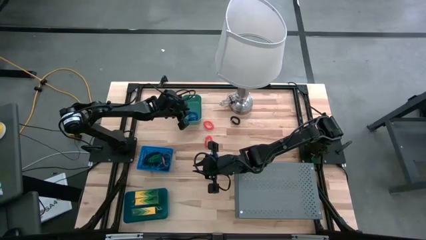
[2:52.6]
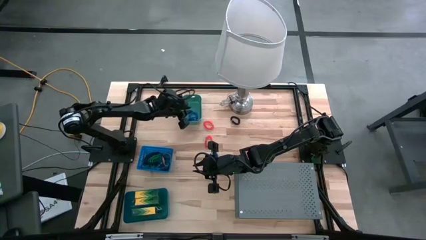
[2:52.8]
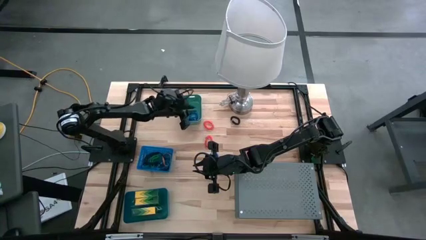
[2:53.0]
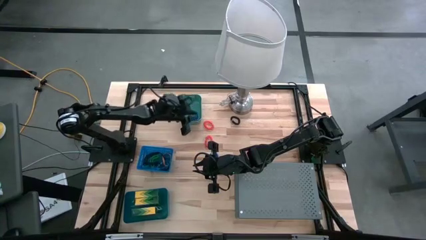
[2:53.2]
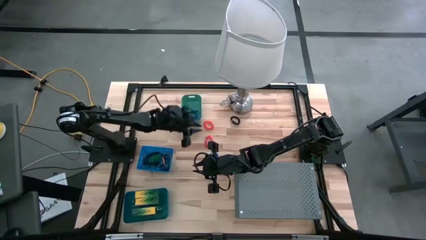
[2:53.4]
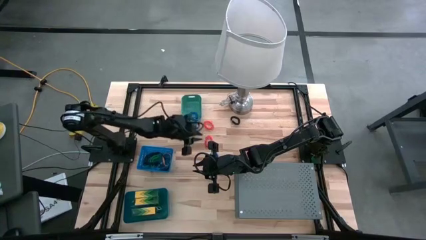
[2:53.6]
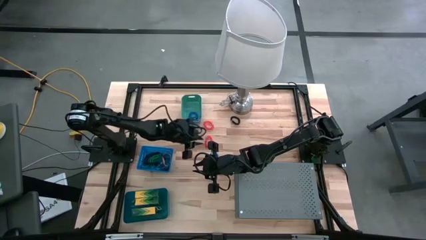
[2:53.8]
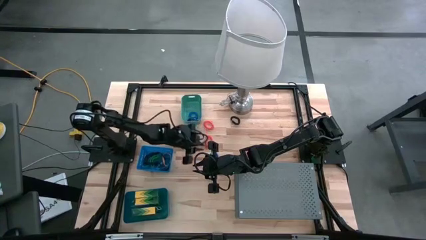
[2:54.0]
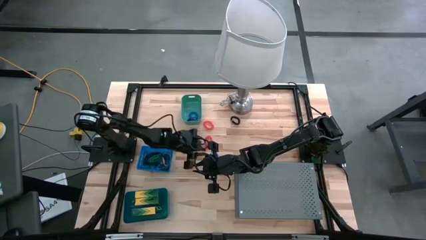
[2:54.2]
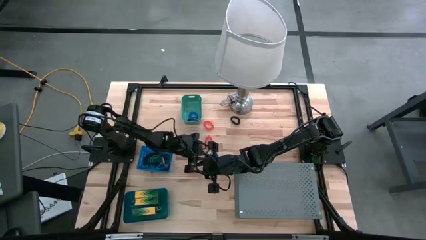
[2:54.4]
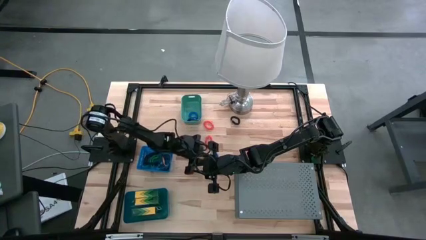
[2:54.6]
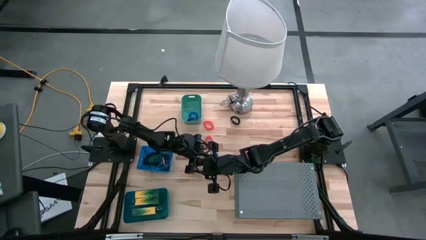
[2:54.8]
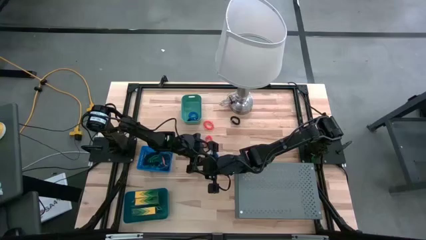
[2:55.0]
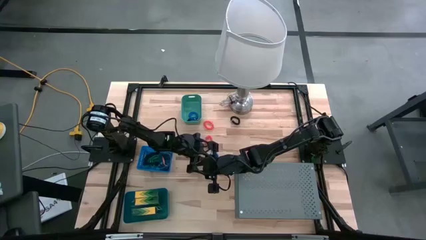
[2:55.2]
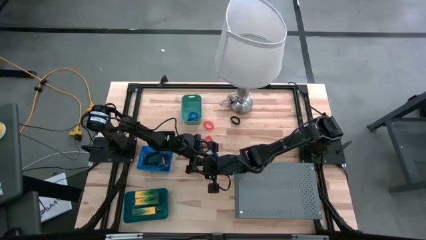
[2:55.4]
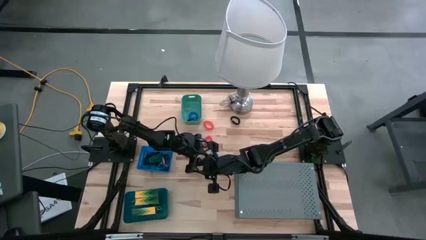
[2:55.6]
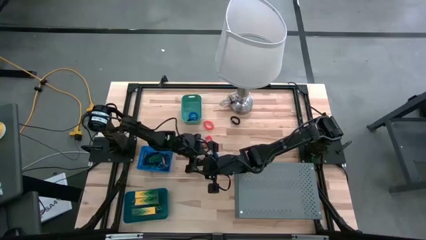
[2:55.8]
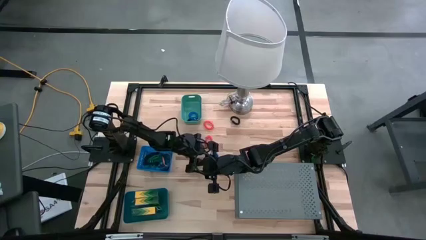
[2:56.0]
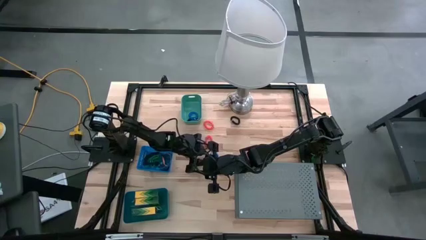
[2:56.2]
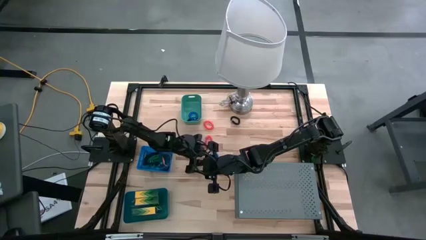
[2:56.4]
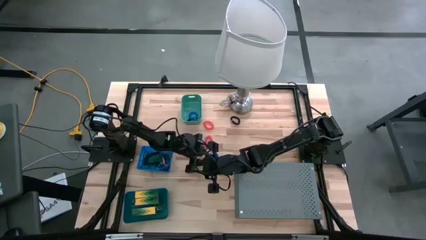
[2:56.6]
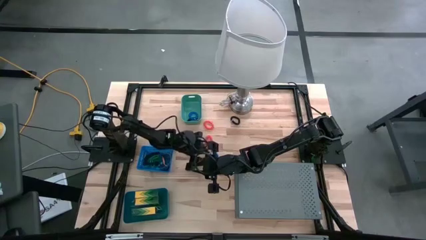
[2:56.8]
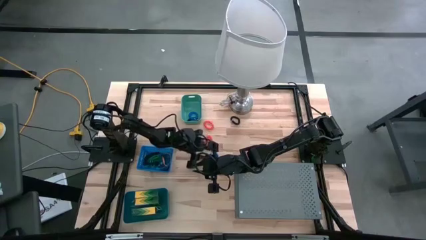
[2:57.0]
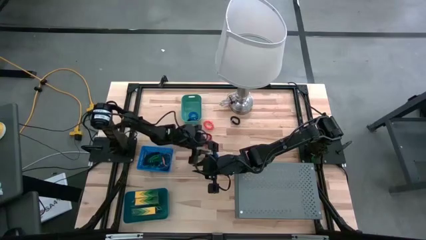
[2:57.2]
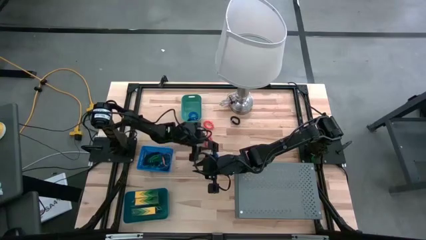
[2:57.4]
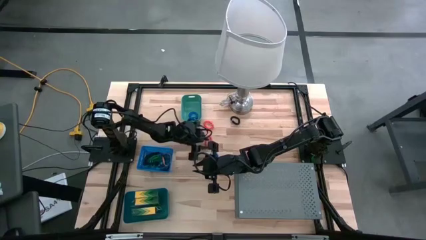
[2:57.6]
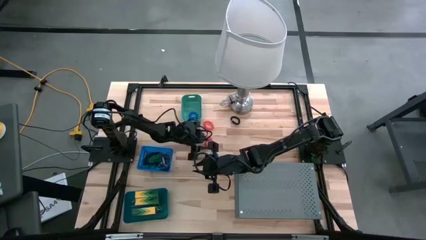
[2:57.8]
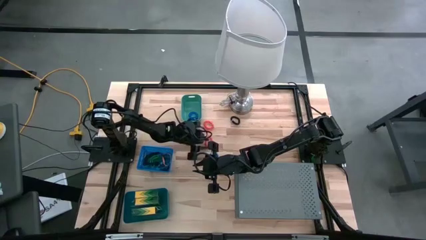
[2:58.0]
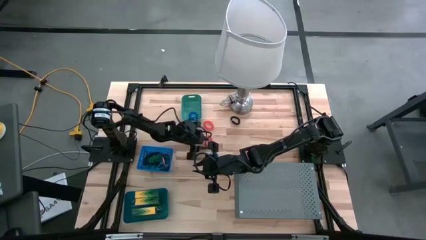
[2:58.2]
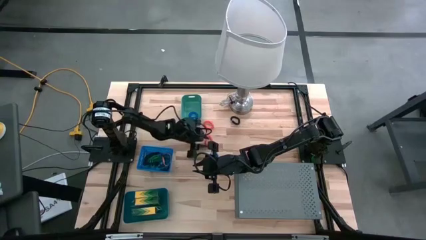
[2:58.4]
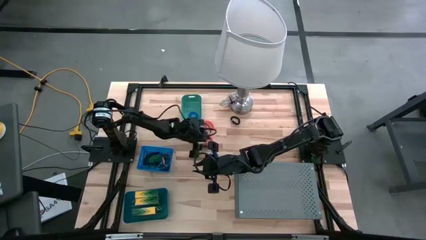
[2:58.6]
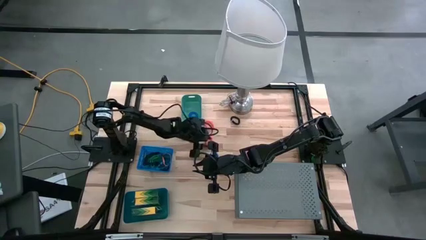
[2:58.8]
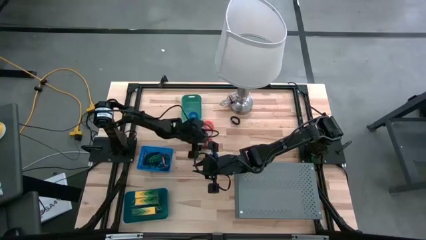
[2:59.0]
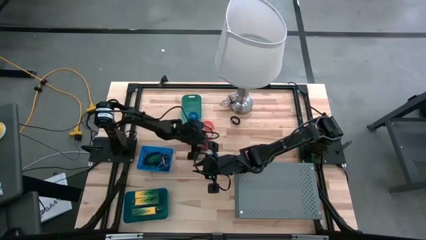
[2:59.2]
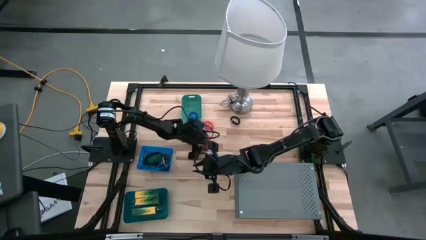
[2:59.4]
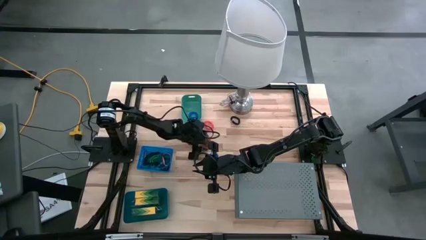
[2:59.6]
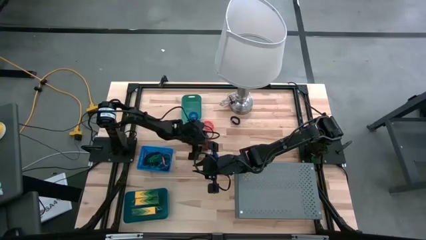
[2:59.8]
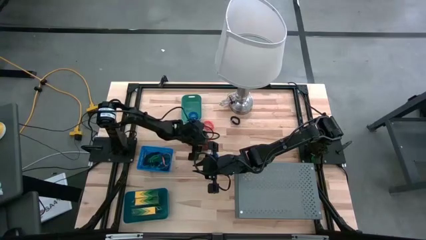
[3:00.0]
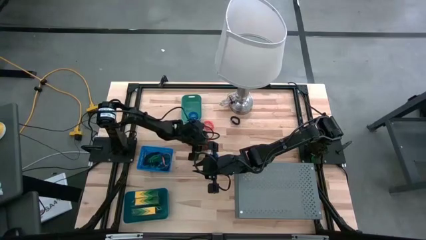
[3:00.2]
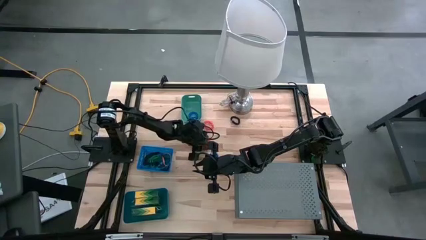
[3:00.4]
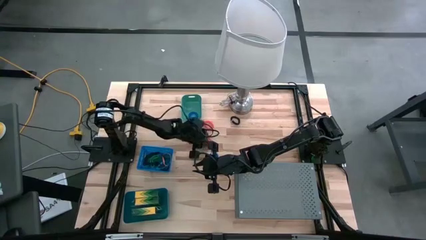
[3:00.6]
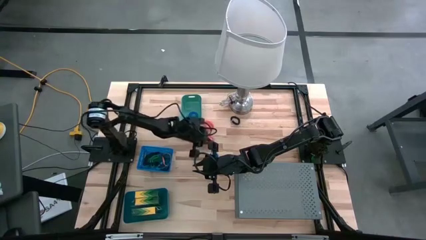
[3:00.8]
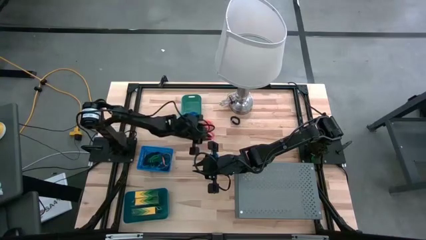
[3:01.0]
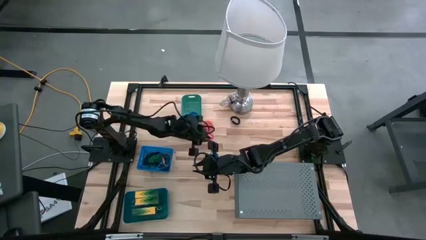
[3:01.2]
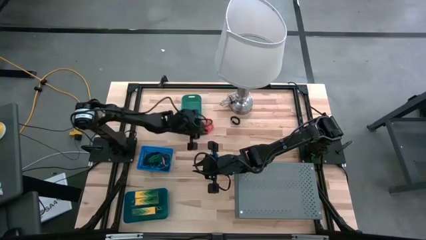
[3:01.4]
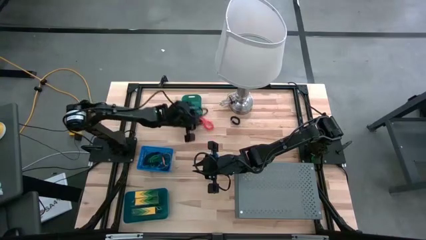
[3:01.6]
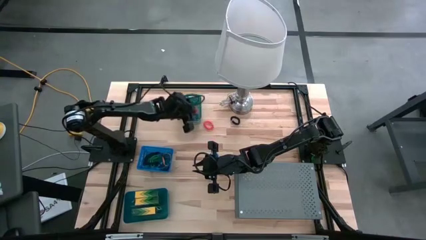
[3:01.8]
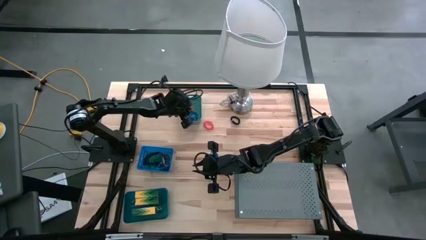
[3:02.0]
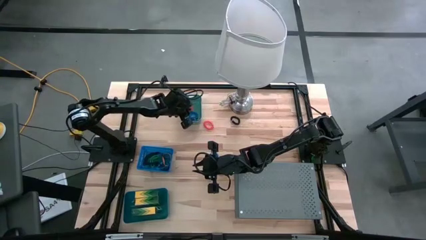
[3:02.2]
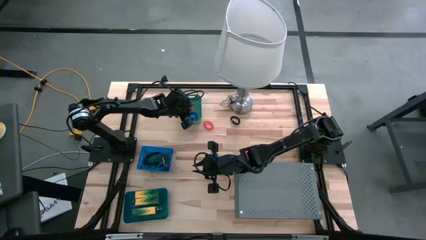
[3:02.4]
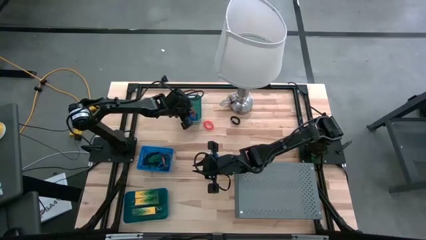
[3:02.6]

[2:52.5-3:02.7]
Task: Pick & Place Office Desk Supplies
Put the orange spring rubberband into the green bin

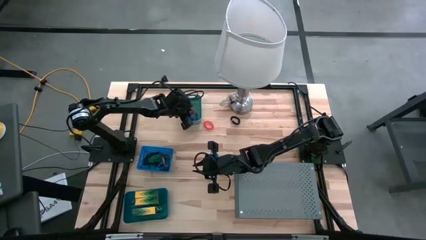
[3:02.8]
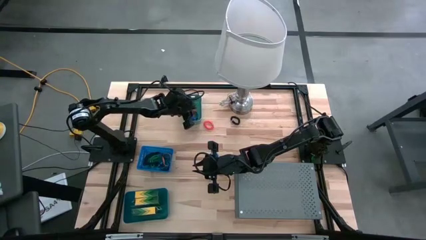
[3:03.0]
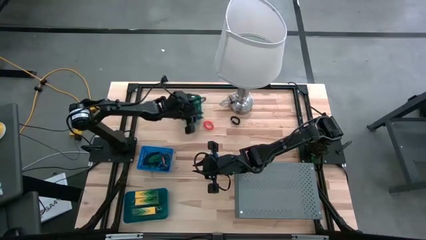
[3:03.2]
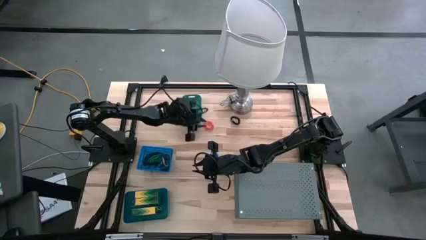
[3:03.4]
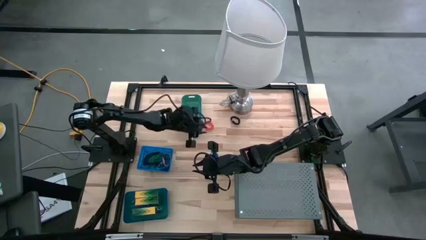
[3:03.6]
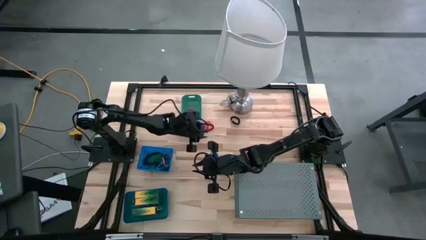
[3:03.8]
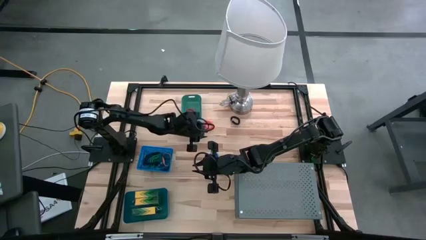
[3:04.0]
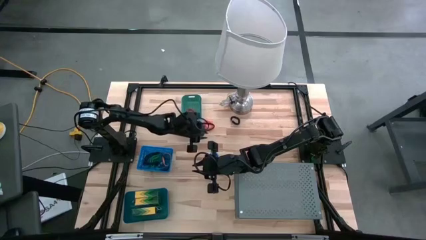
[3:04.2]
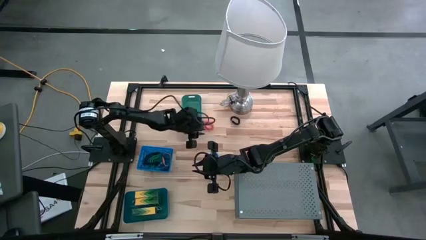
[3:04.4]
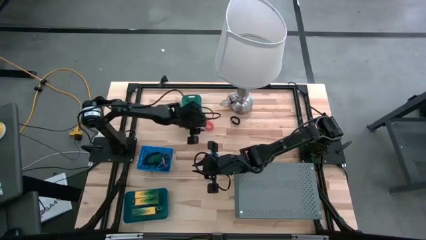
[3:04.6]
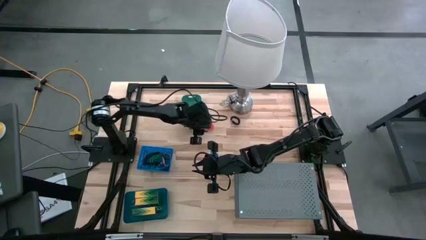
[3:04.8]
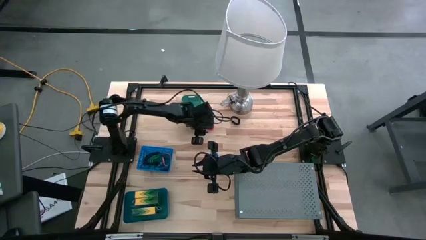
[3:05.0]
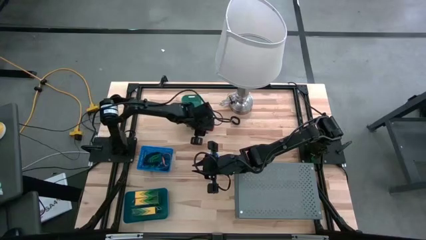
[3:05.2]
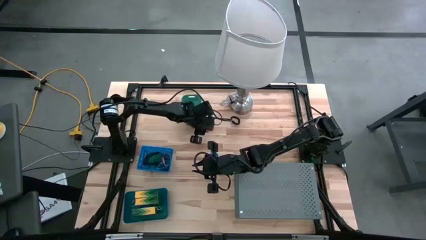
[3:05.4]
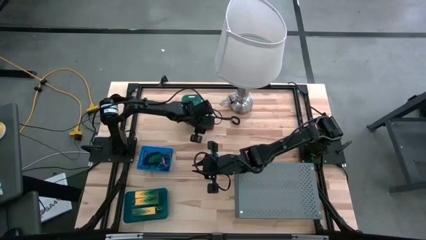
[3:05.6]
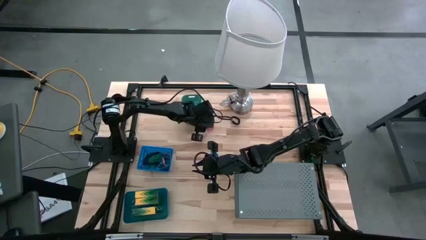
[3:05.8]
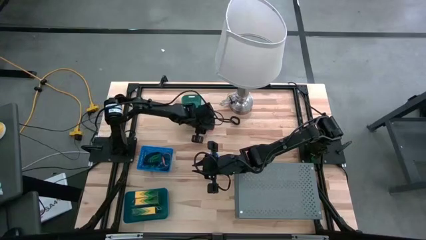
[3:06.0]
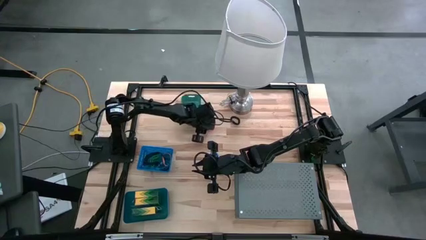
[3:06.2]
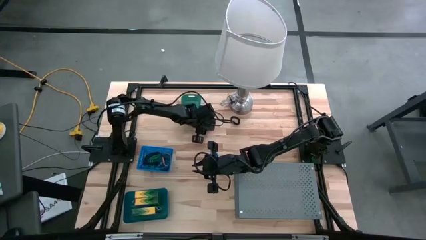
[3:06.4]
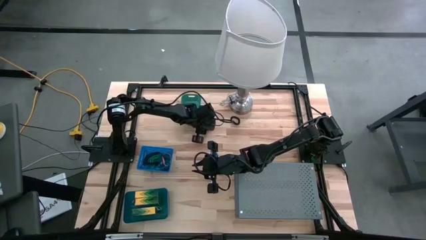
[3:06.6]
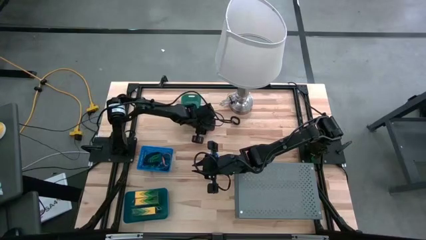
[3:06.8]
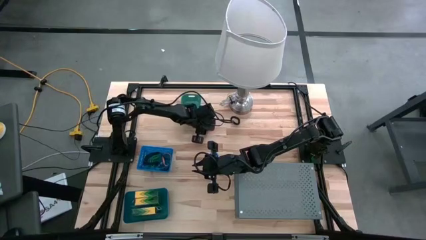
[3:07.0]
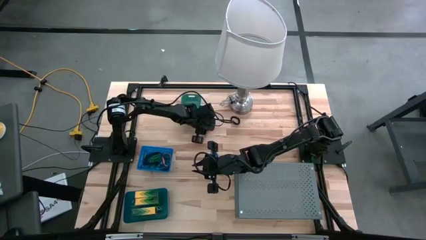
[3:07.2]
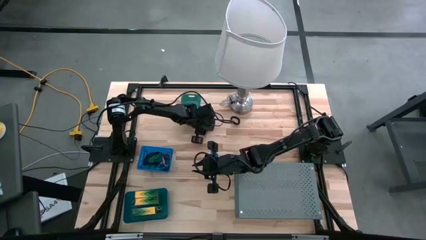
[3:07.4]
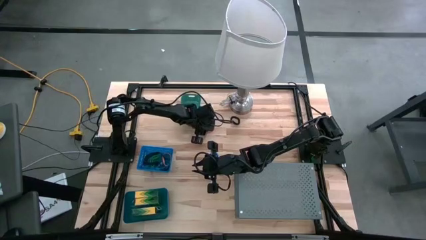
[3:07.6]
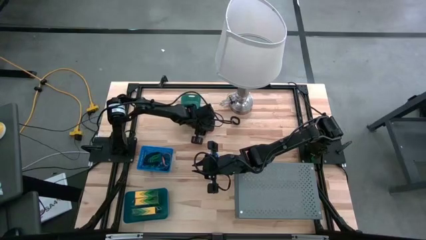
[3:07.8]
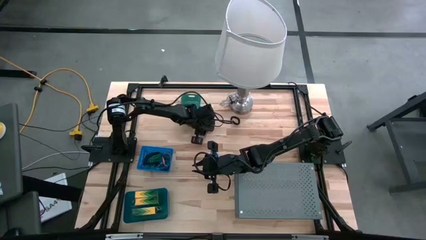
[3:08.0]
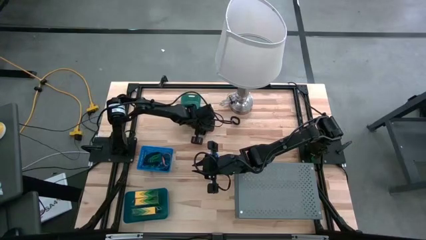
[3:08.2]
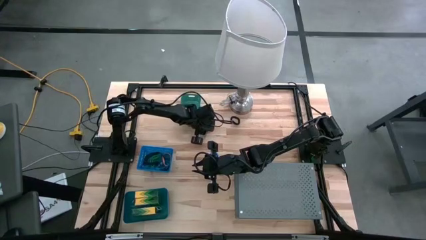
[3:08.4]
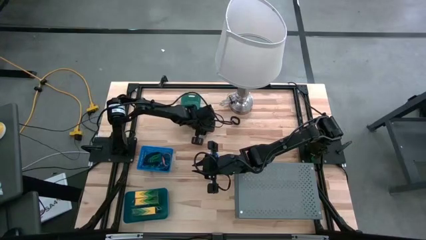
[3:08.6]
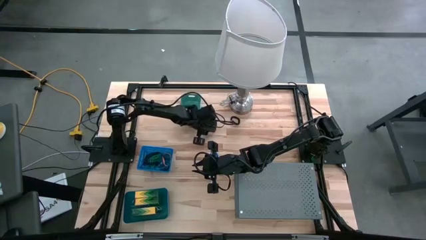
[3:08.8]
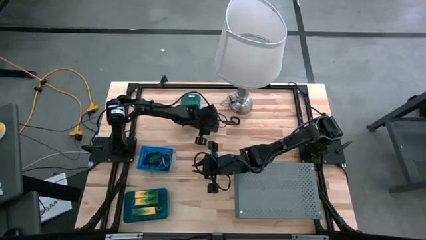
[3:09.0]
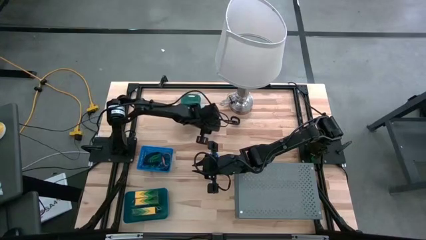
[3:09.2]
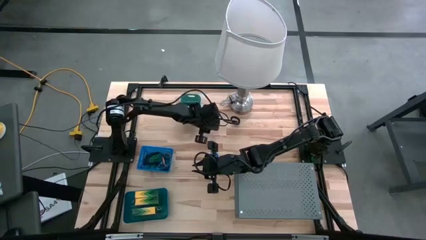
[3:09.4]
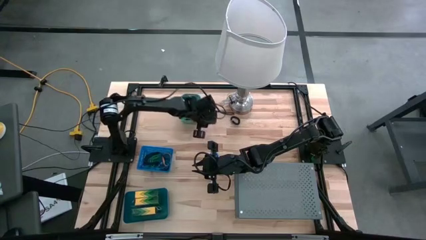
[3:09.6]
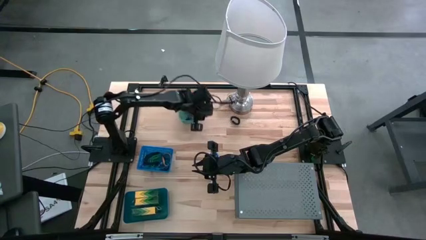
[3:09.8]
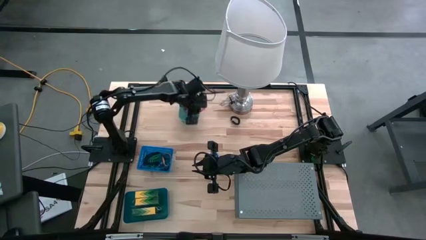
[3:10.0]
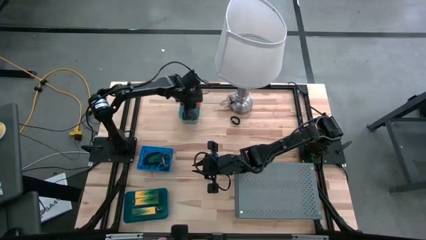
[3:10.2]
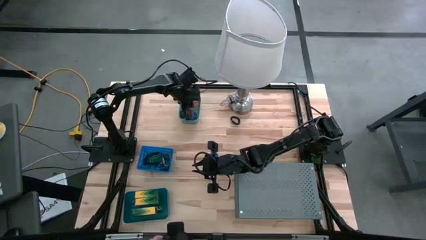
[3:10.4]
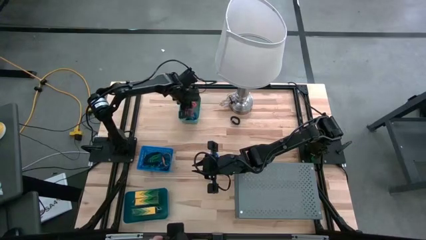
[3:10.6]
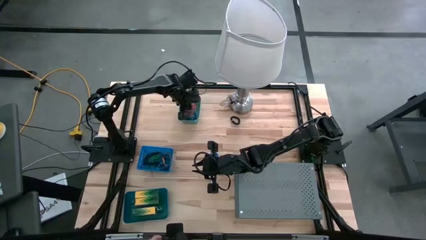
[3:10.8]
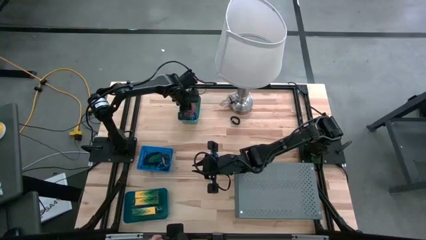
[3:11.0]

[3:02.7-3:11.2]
Put the orange spring rubberband into the green bin
